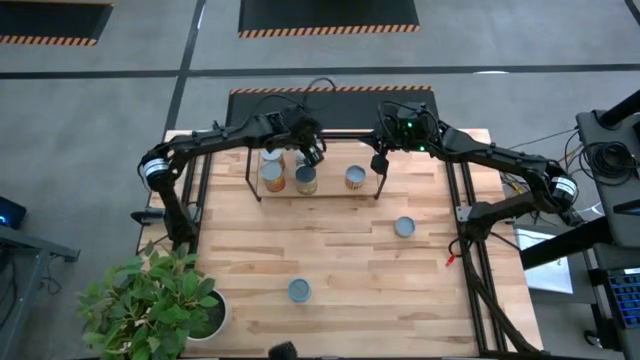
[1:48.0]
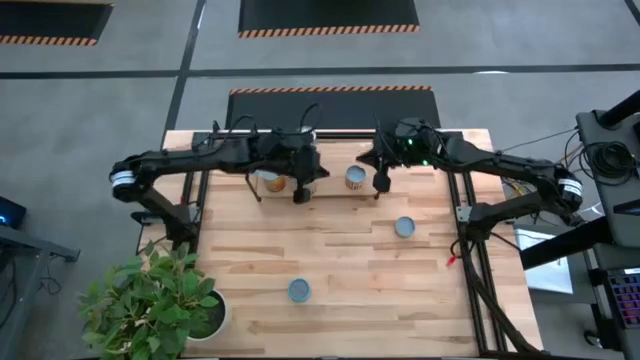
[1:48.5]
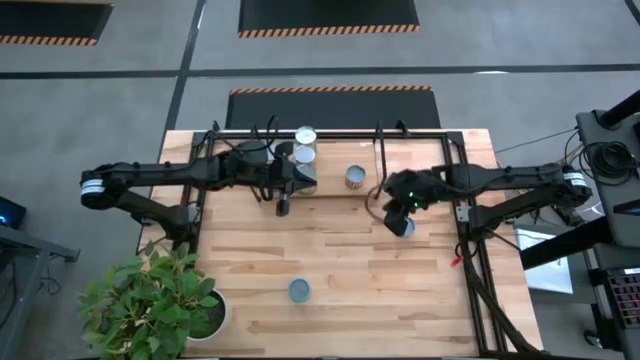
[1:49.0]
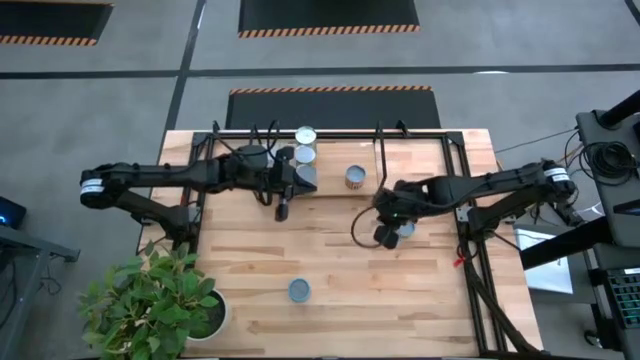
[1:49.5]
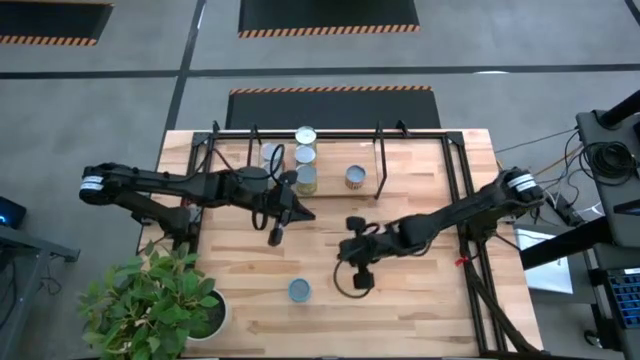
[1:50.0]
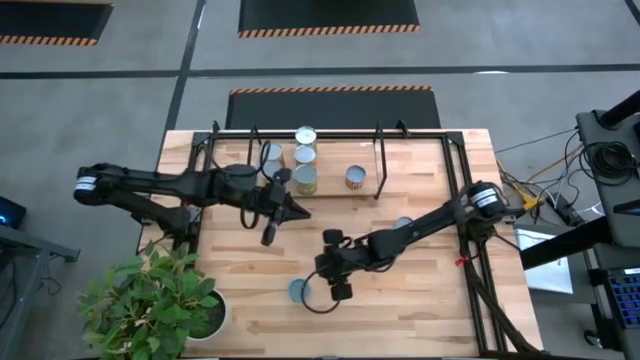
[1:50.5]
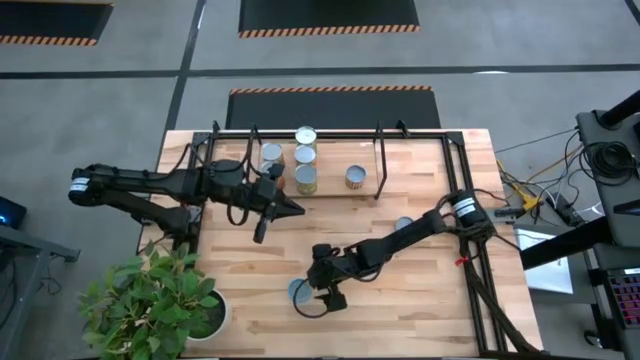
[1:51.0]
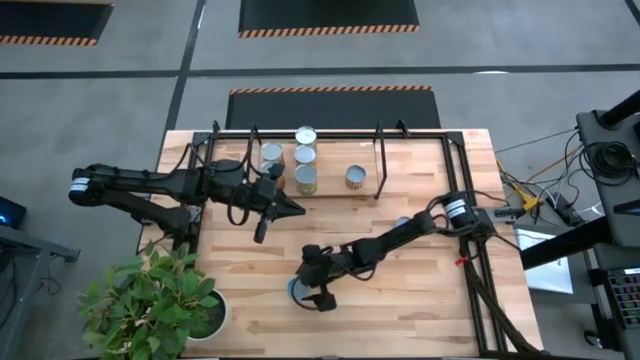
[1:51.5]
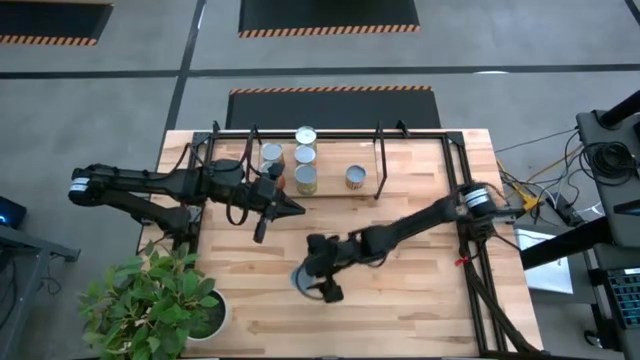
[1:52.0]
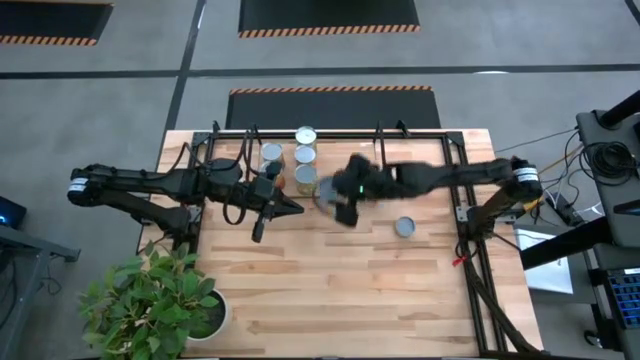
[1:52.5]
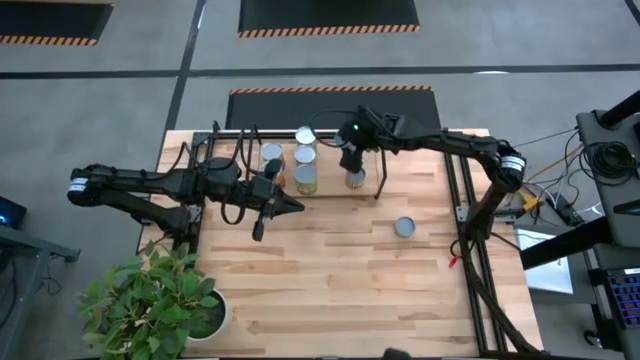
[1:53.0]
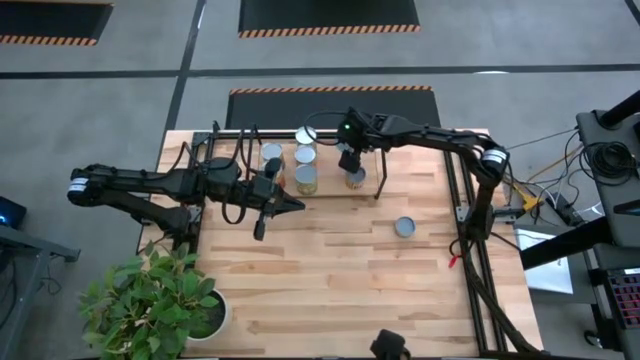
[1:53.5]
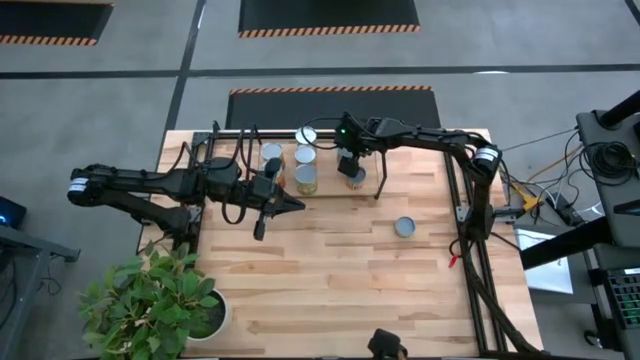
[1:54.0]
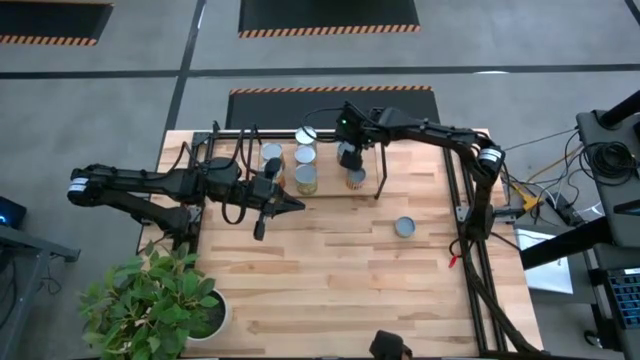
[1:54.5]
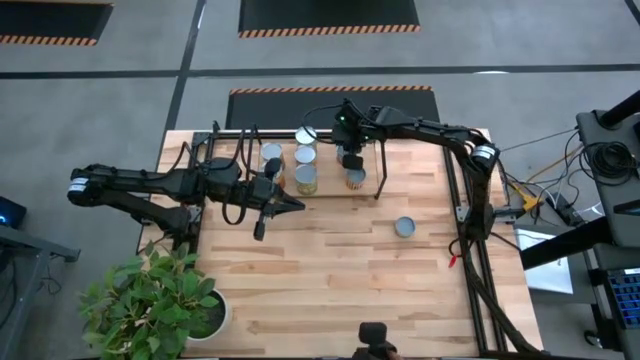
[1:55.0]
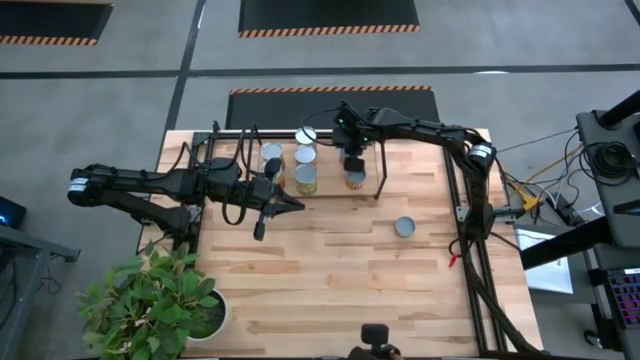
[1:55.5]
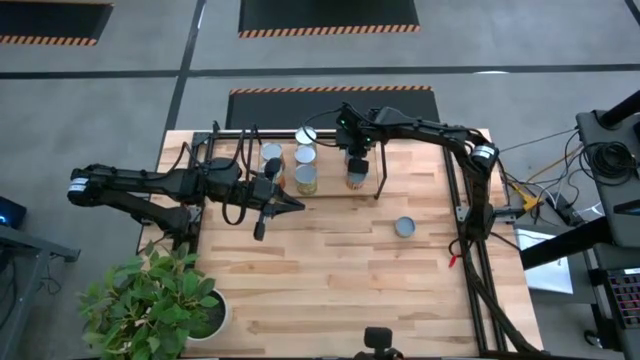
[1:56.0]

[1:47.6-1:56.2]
Task: Pick and place cans onto a shelf
Put the small blue canned corn on the shelf aligned with the other small yellow canned bean

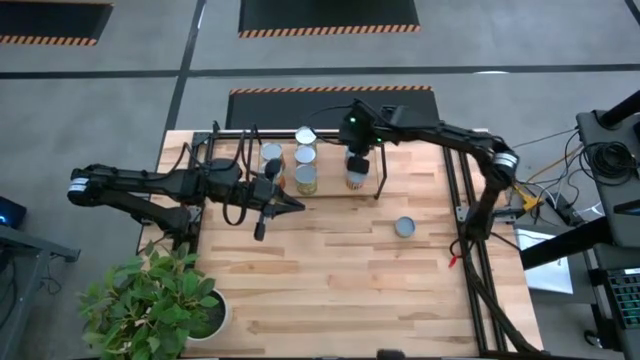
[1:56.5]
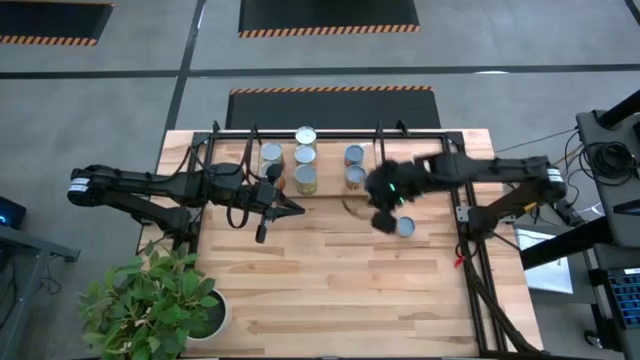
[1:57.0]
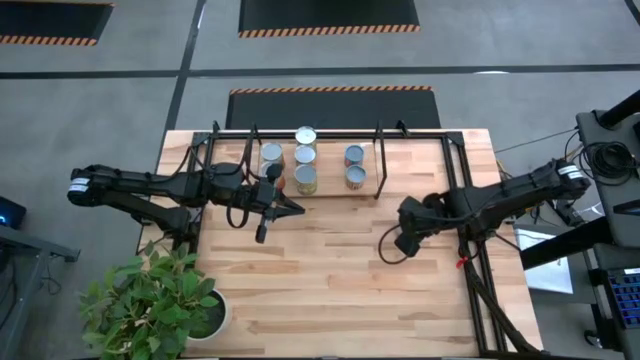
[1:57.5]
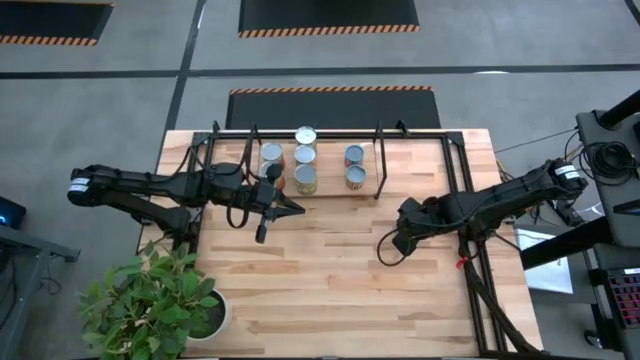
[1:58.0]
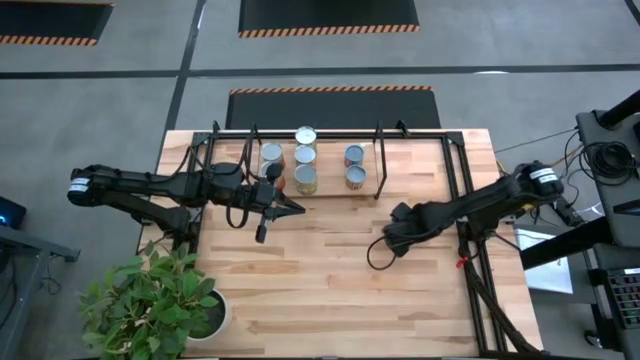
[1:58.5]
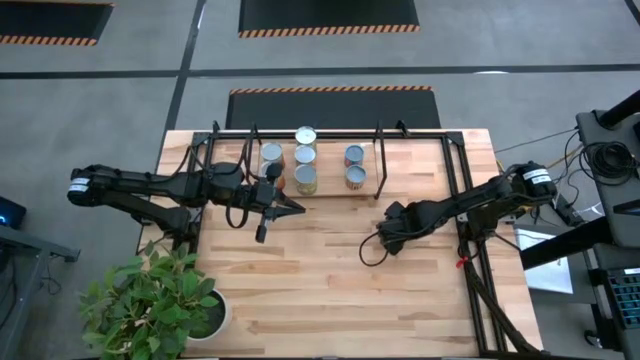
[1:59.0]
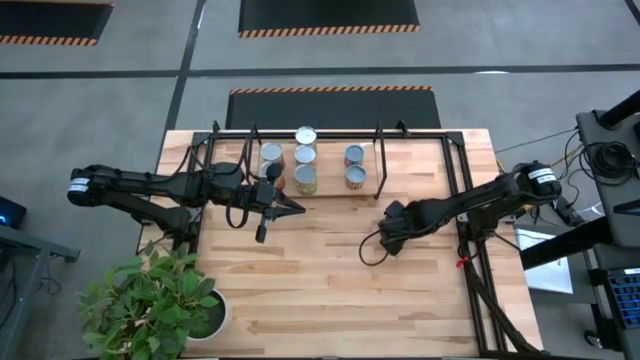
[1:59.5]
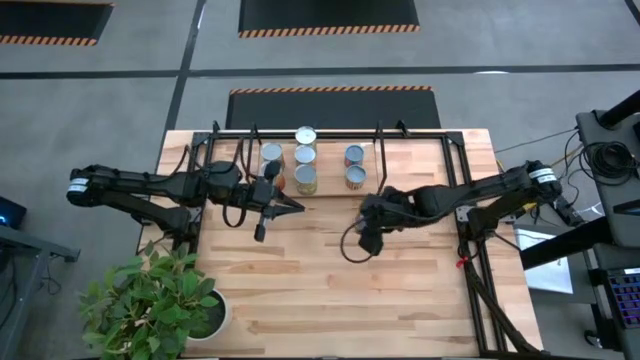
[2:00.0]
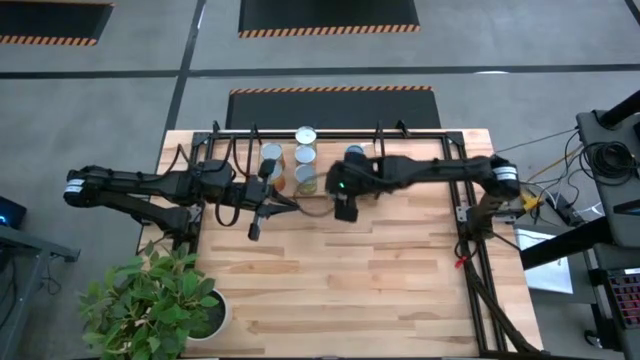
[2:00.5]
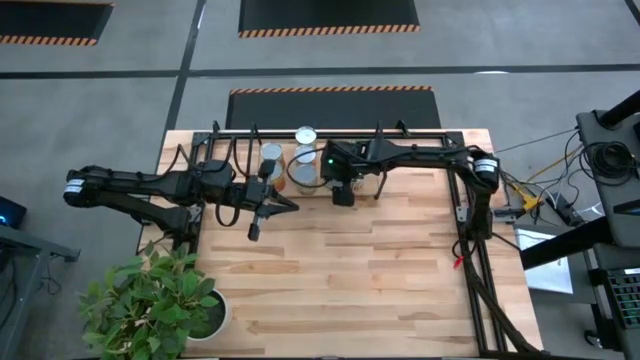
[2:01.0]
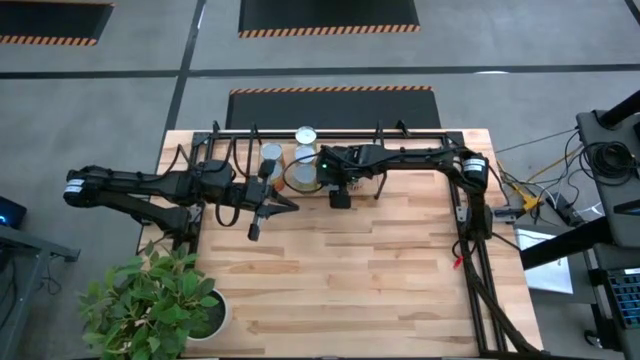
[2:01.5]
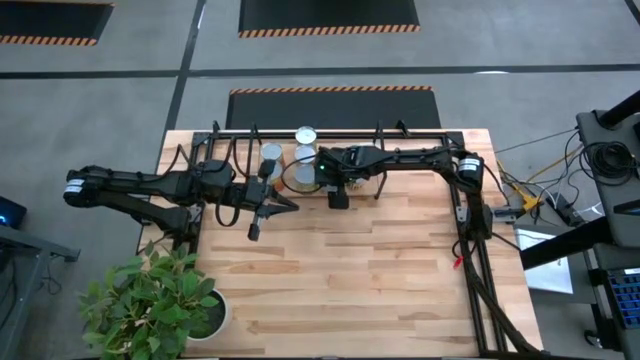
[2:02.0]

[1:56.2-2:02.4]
Put the small green canned mushroom on the shelf

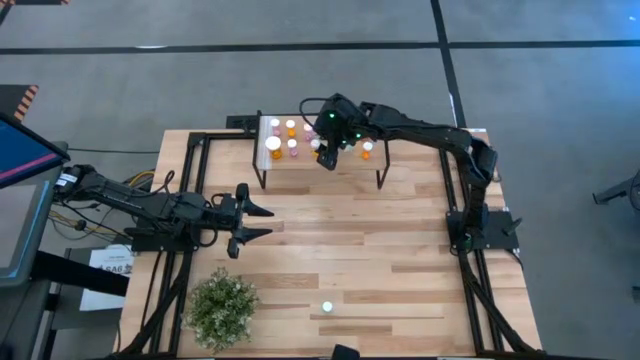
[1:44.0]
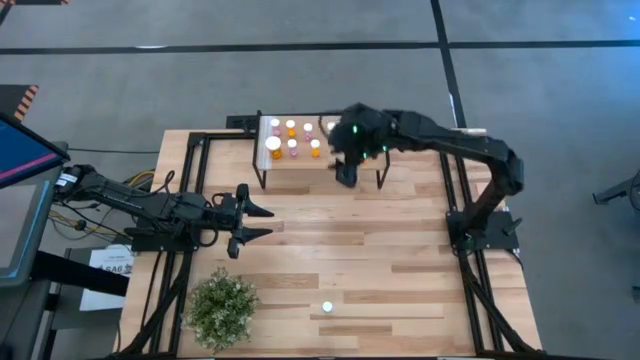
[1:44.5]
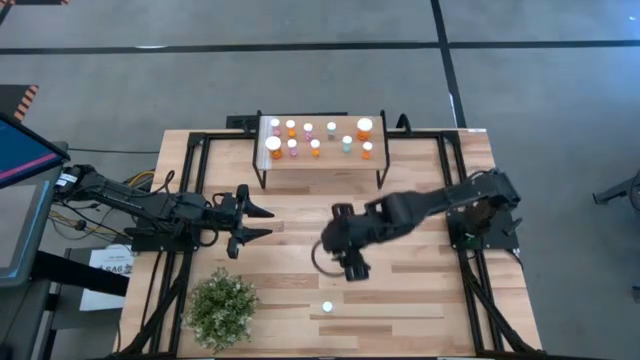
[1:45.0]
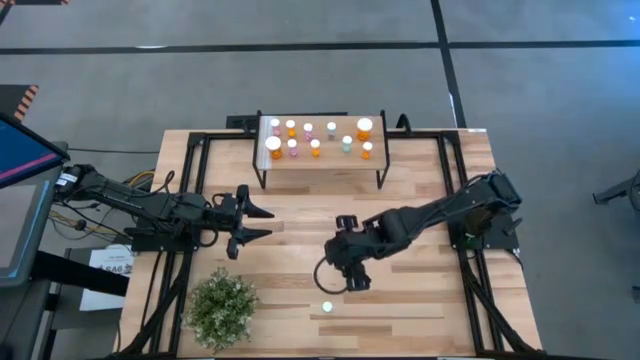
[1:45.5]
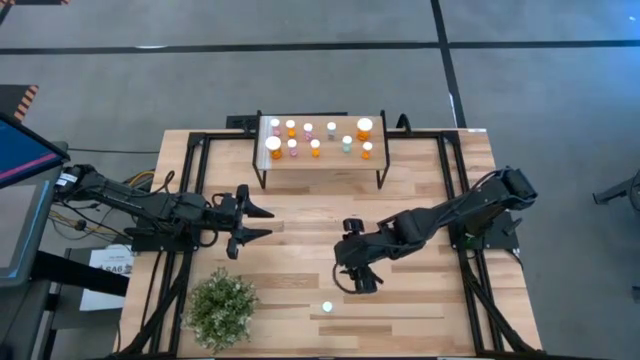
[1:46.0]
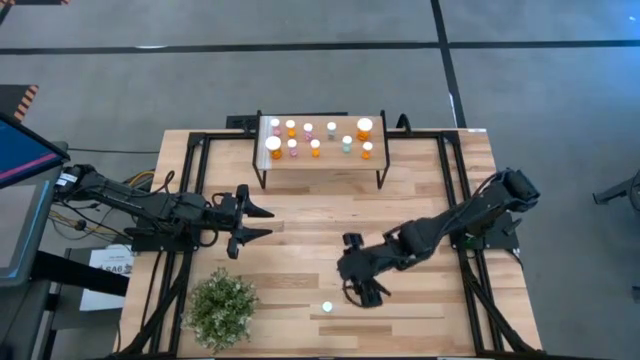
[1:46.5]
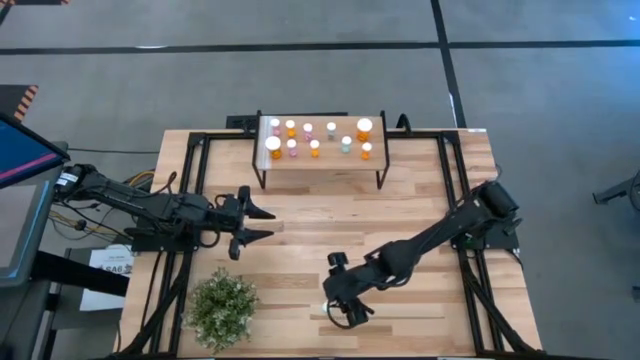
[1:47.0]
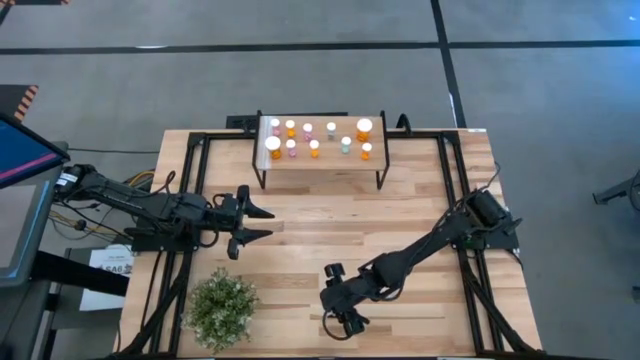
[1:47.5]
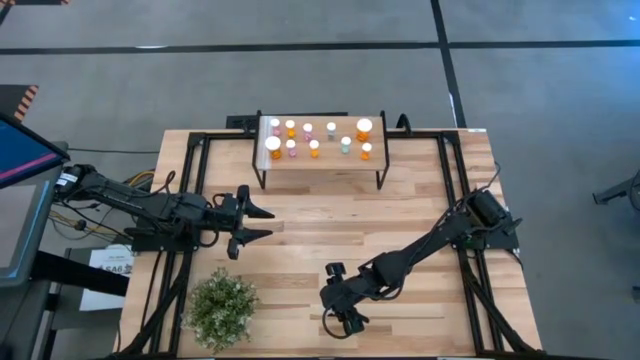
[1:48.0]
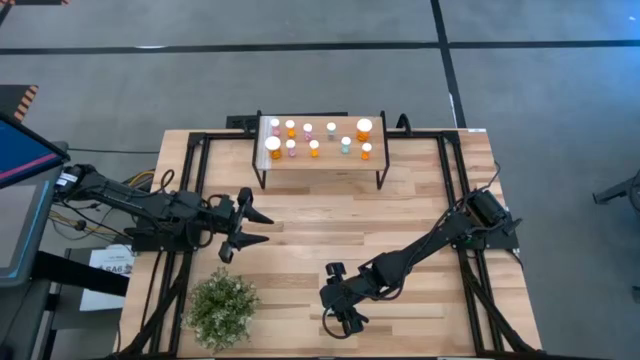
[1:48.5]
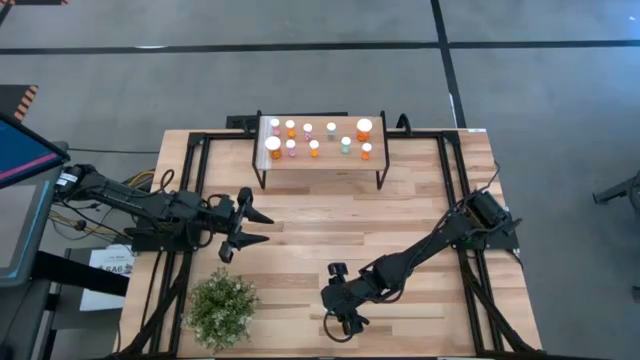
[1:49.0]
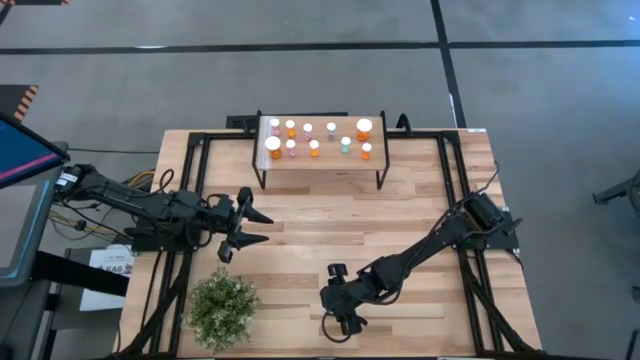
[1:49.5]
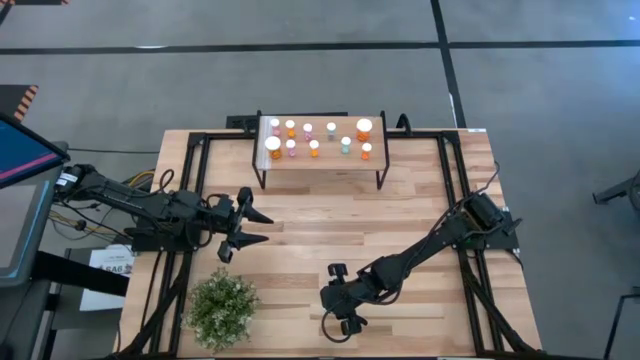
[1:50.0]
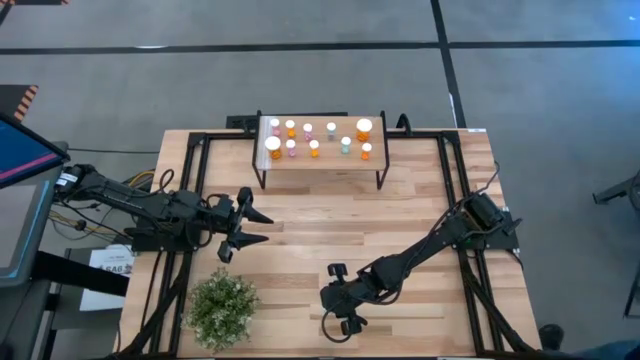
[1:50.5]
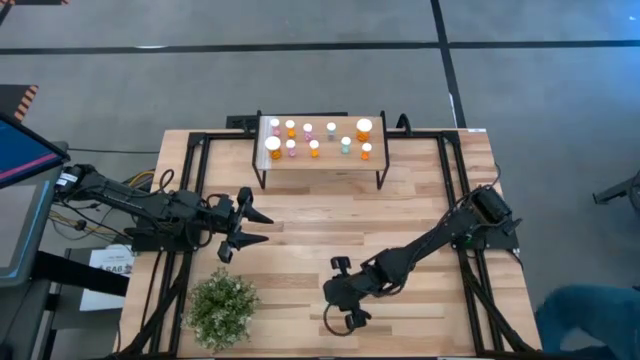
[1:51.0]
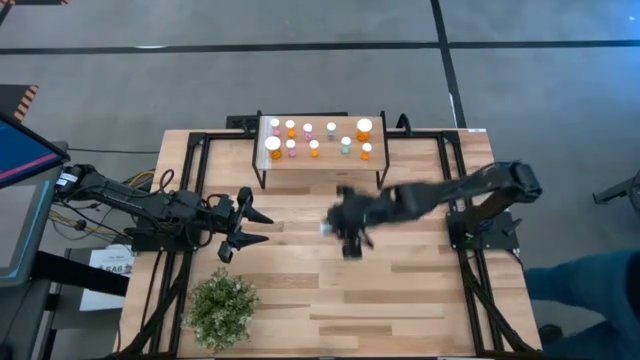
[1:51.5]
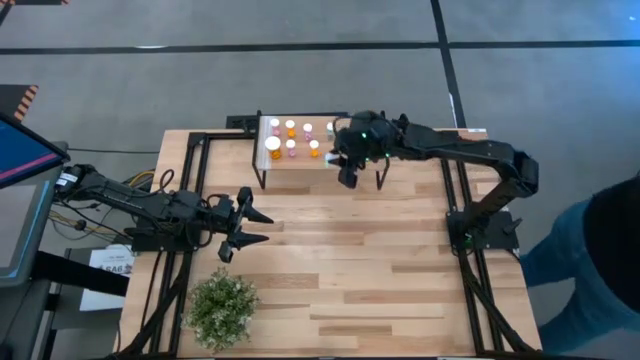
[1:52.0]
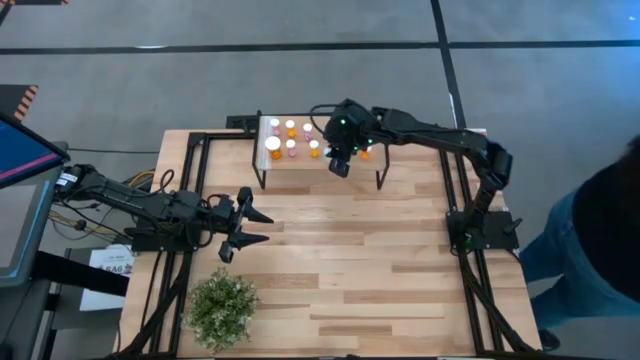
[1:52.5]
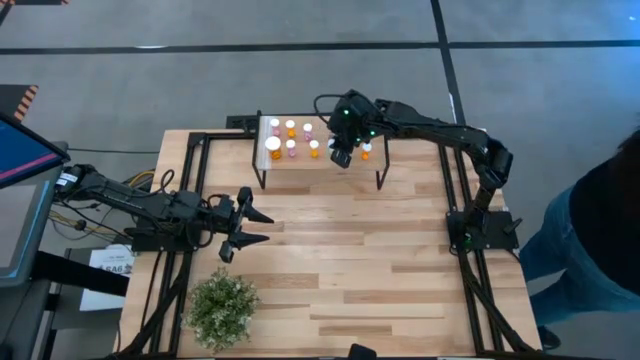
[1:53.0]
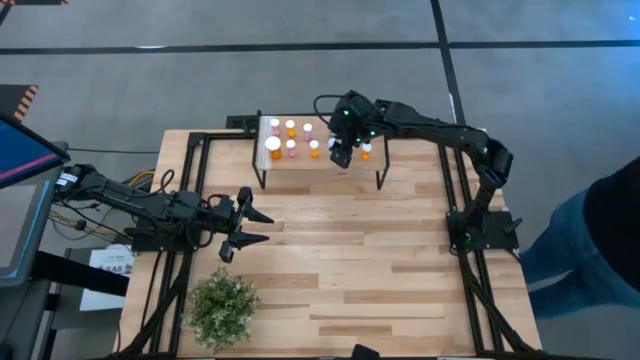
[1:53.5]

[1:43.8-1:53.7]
Task: Pick and place medicine bottles onto shelf by color
Put the small green pill bottle on the shelf
